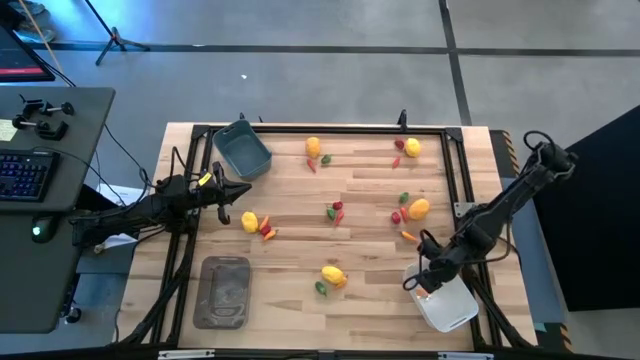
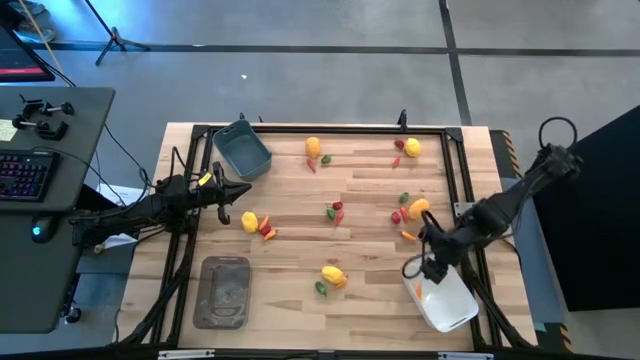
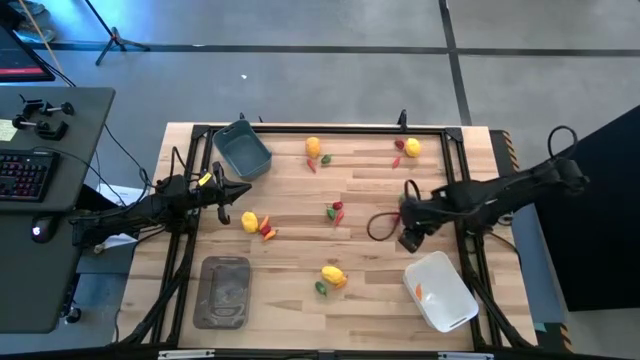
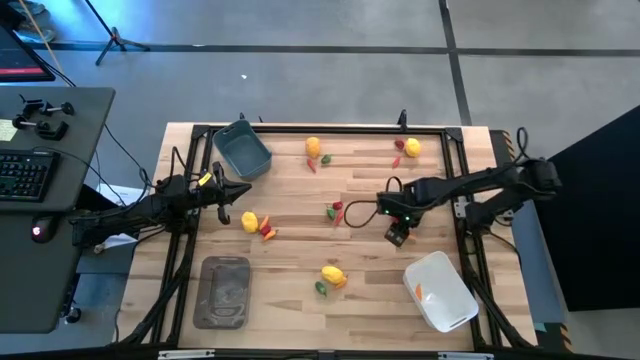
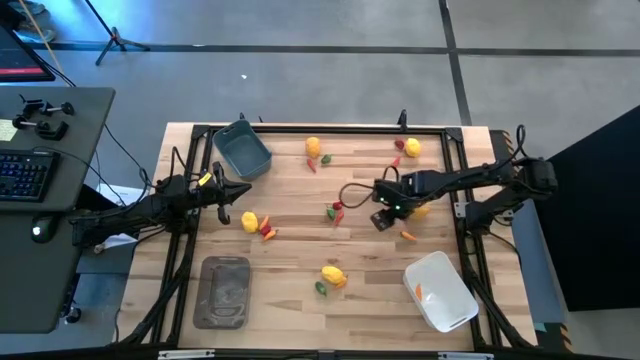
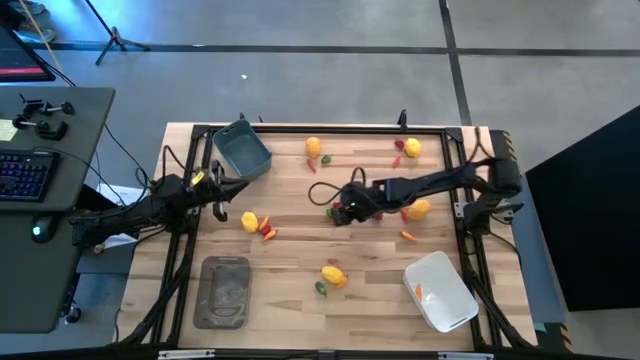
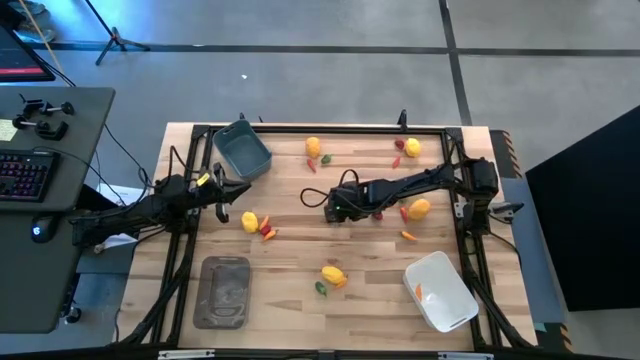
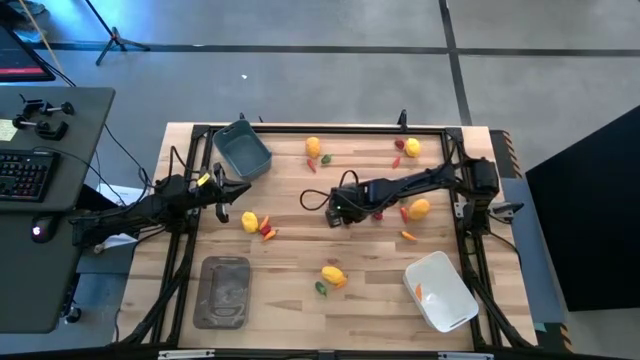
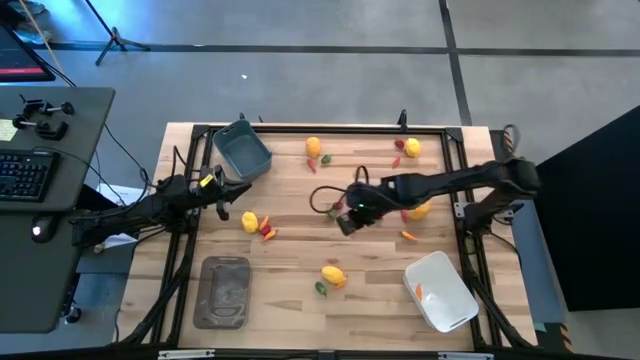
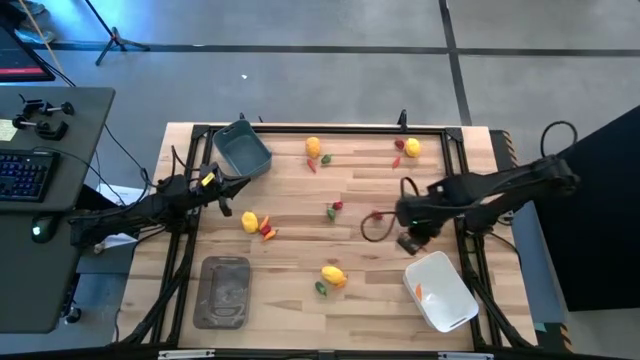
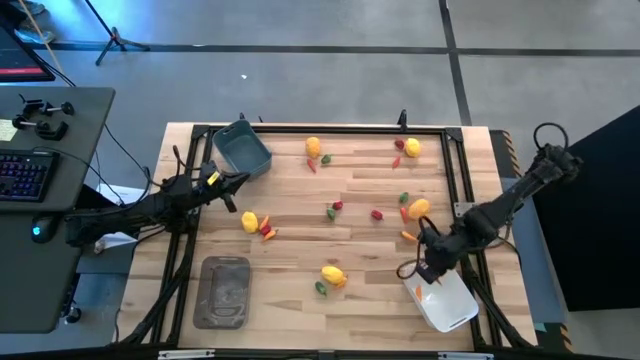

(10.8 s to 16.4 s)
Task: Sort produce into baskets
Put the dark orange chili pepper into the white bin

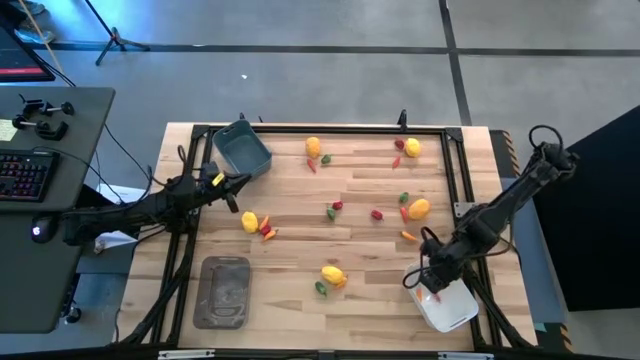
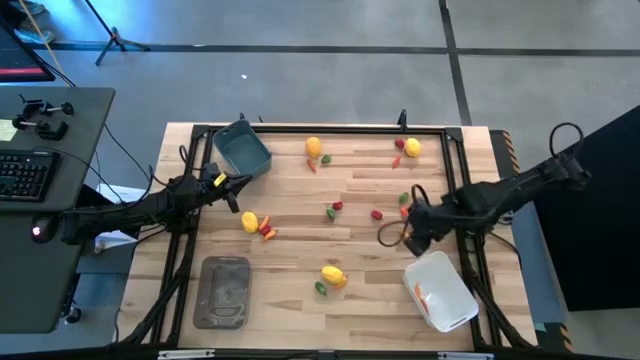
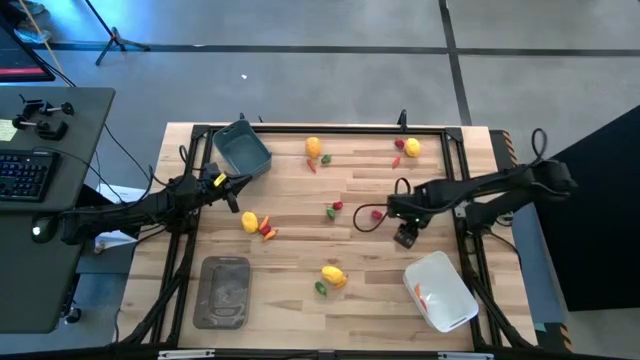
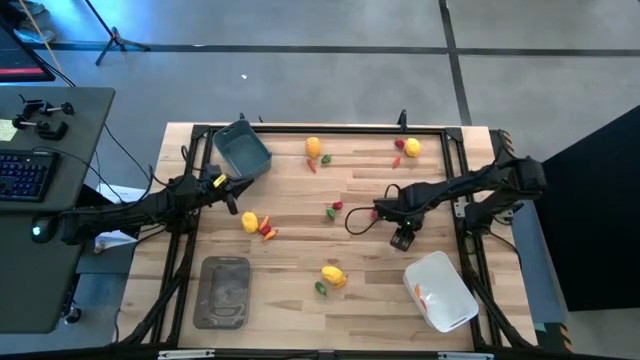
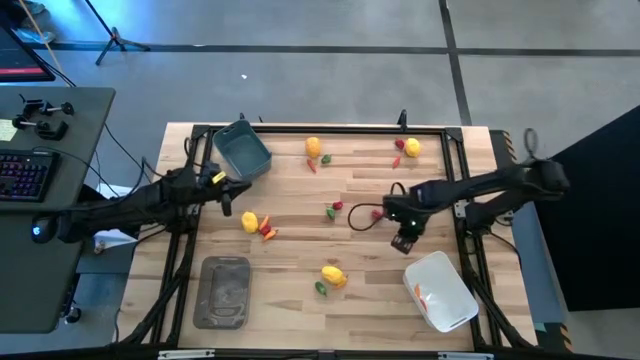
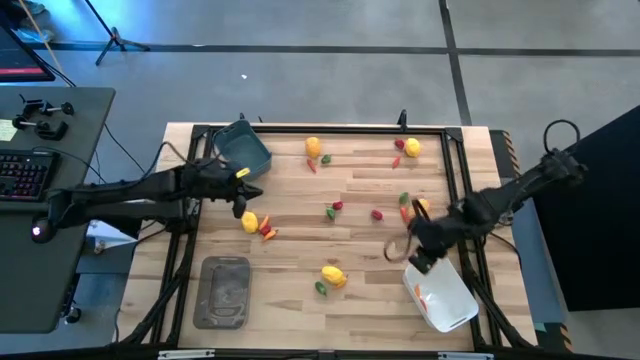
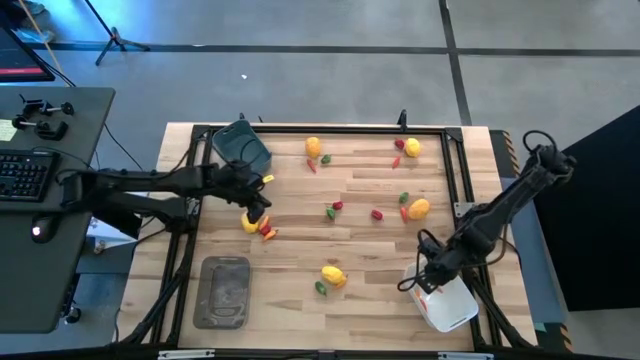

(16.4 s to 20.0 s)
Put the light orange chili pepper into the white bin

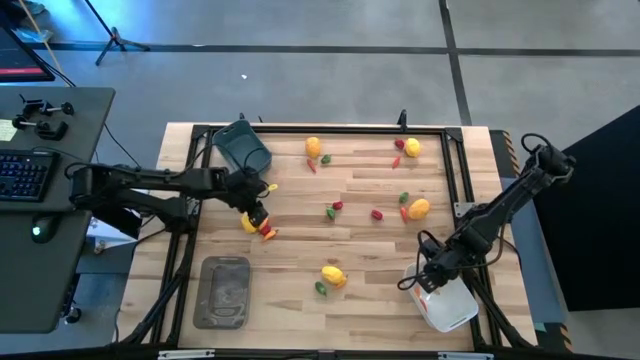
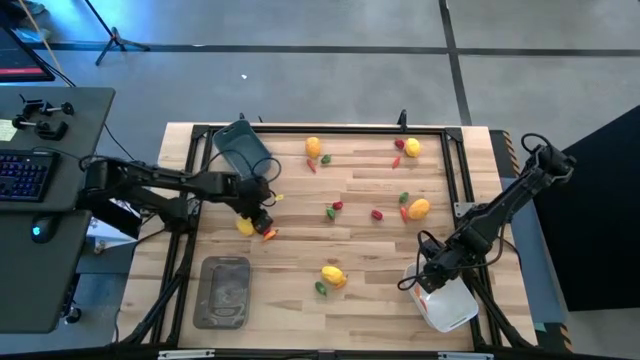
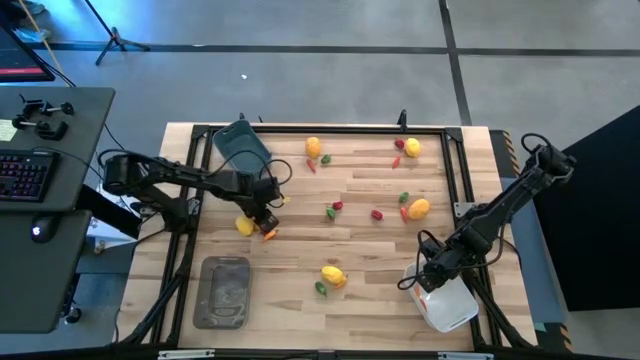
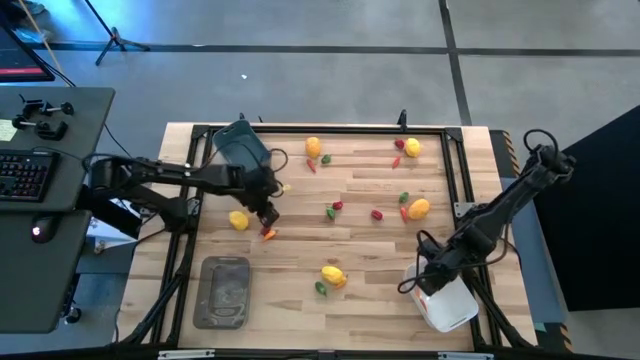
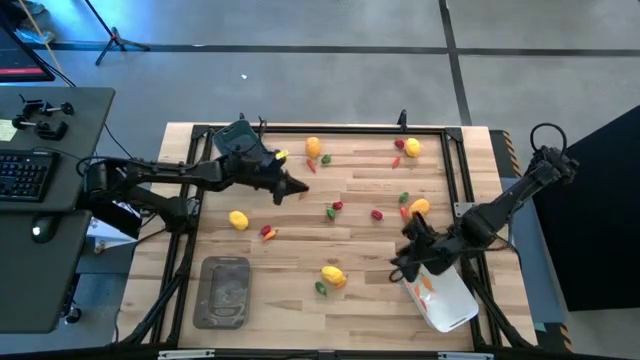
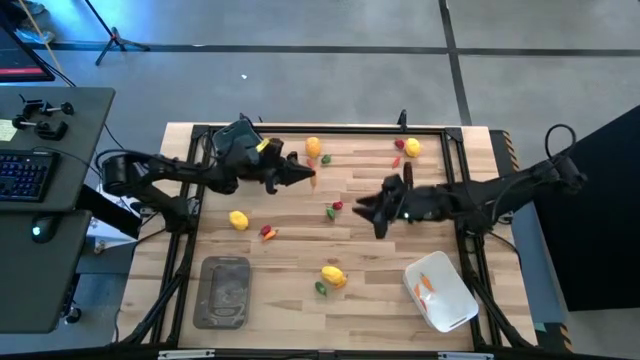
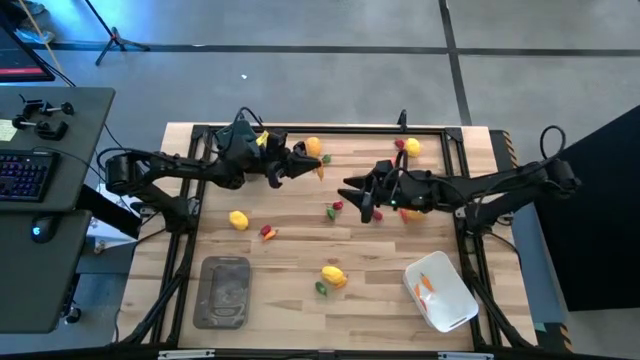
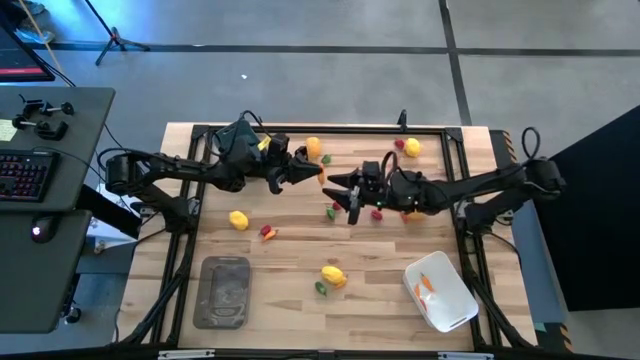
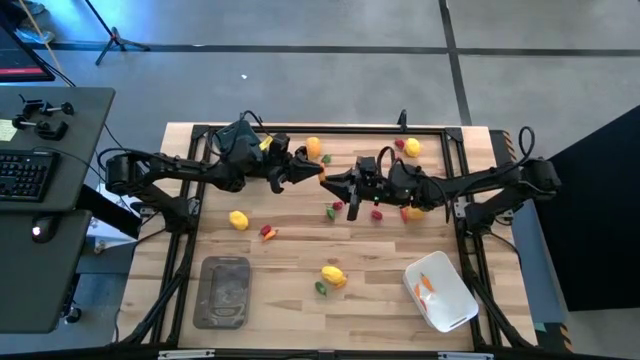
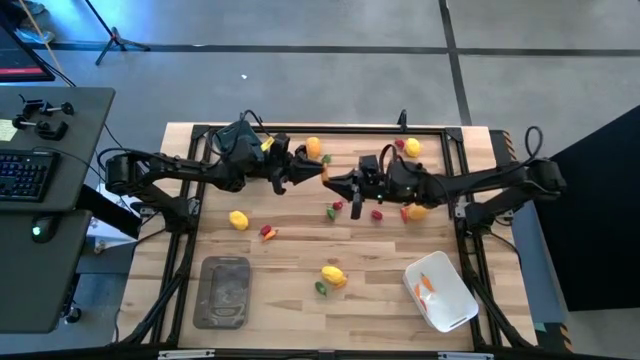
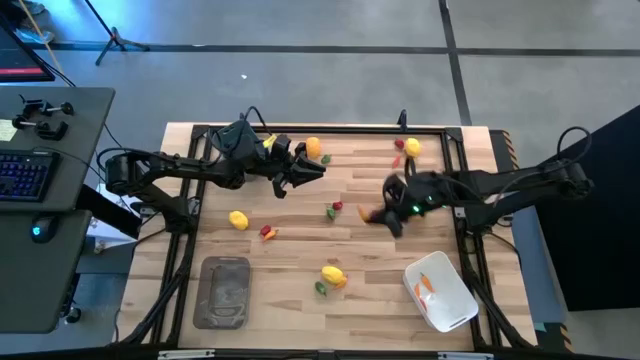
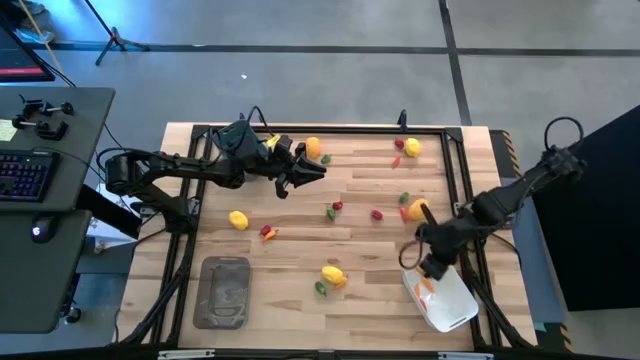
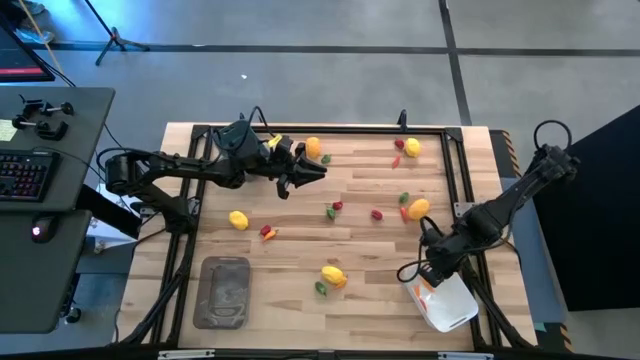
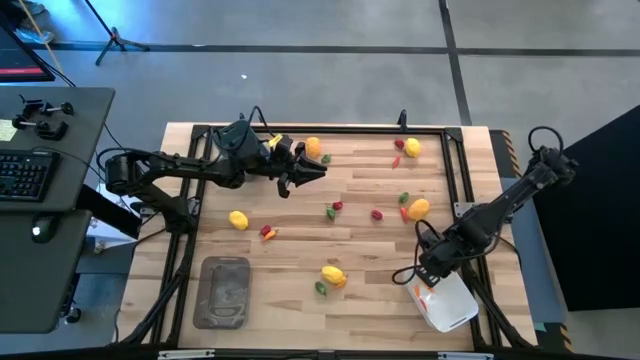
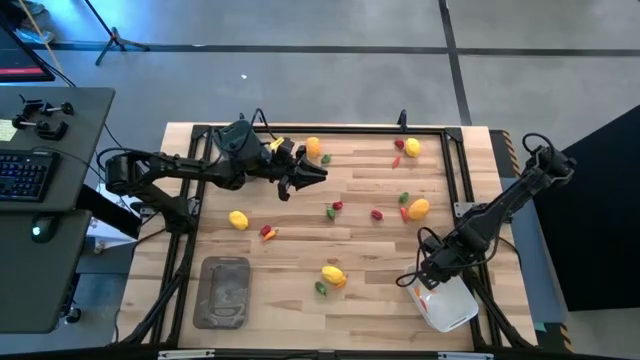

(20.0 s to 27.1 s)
Put the light orange chili pepper into the white bin

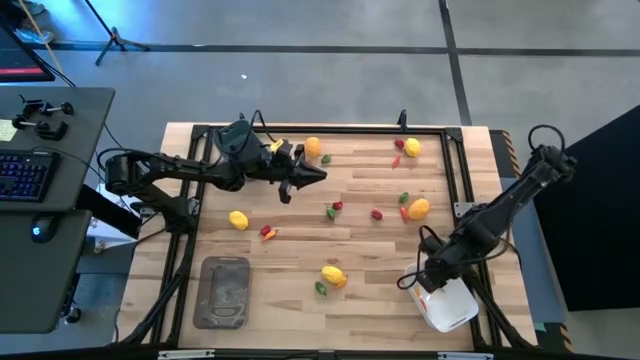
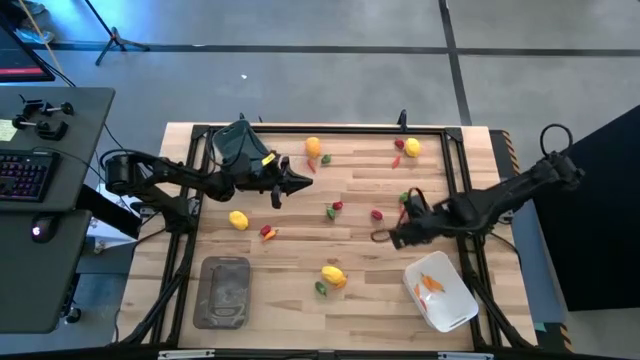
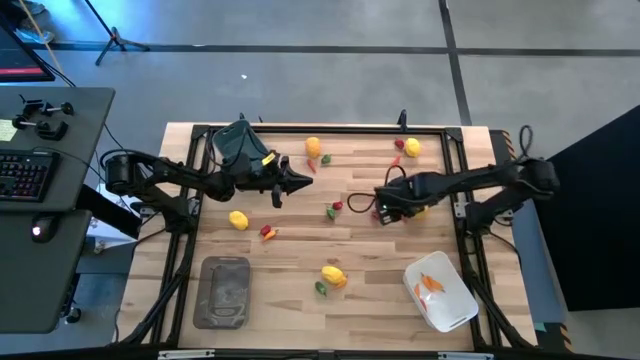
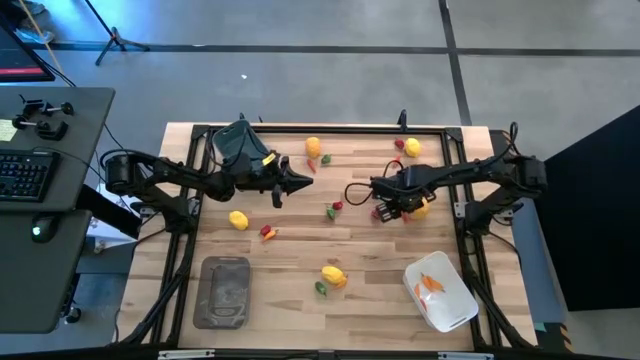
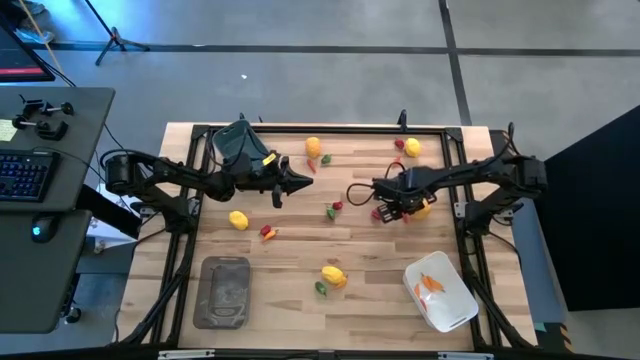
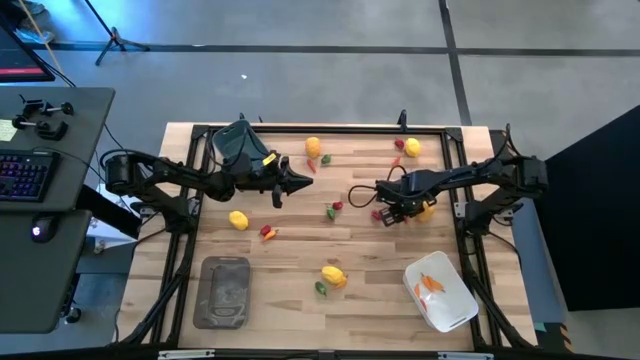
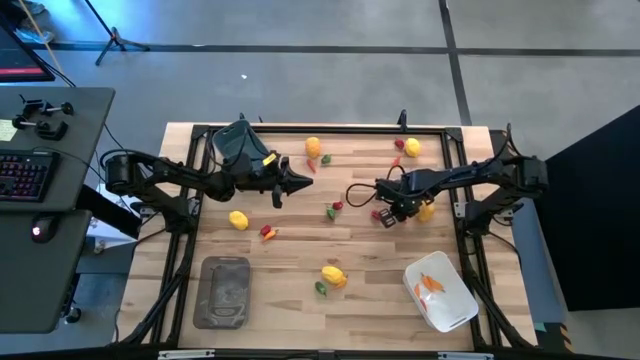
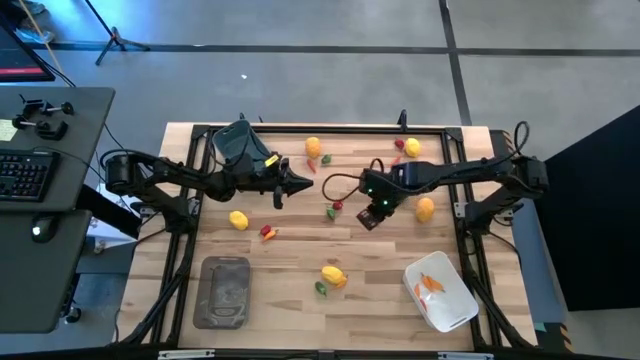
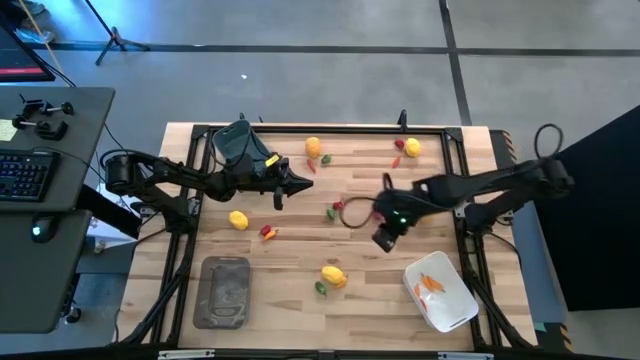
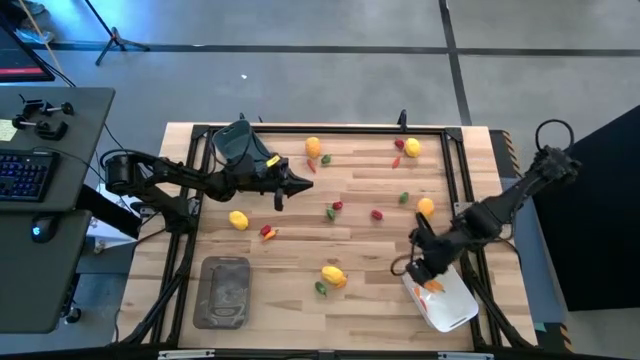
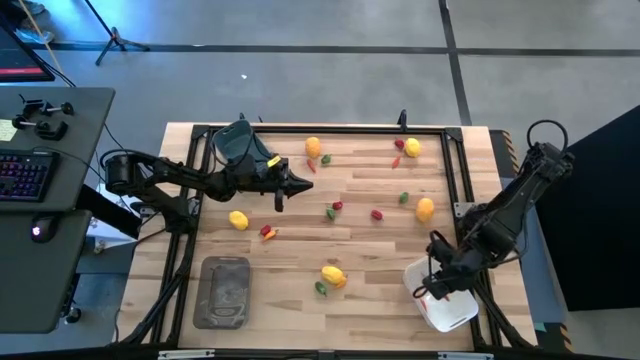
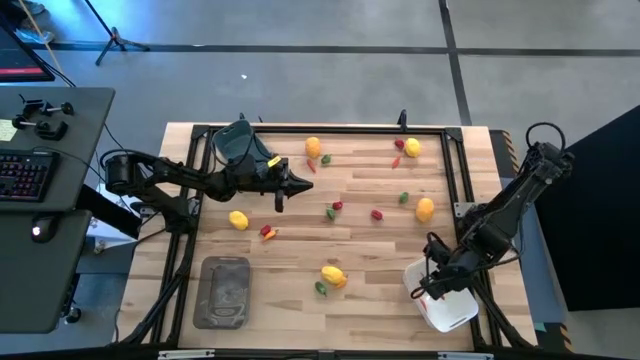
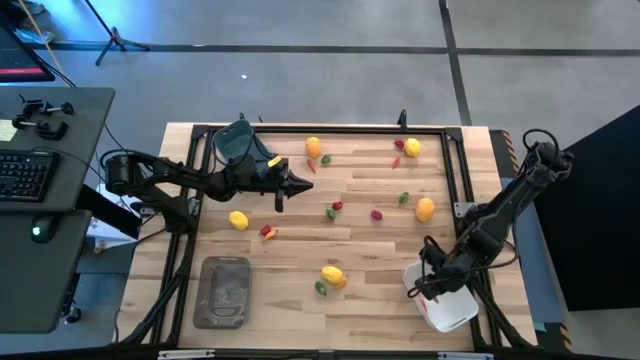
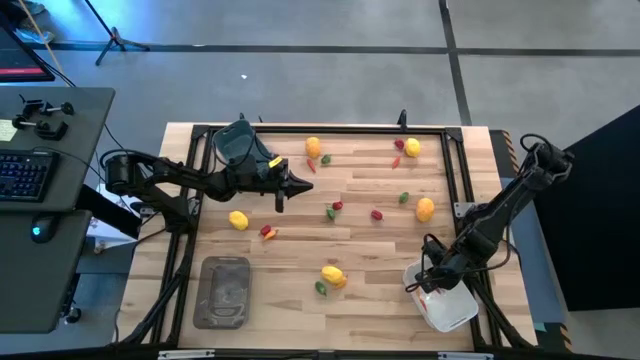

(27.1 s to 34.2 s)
Put the dark orange chili pepper into the white bin
